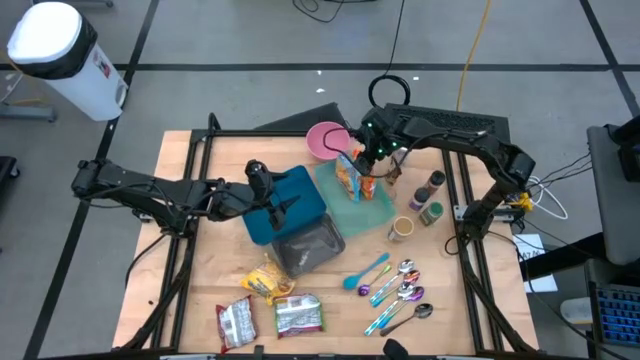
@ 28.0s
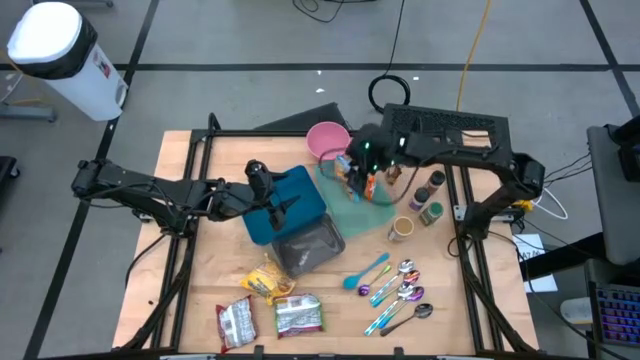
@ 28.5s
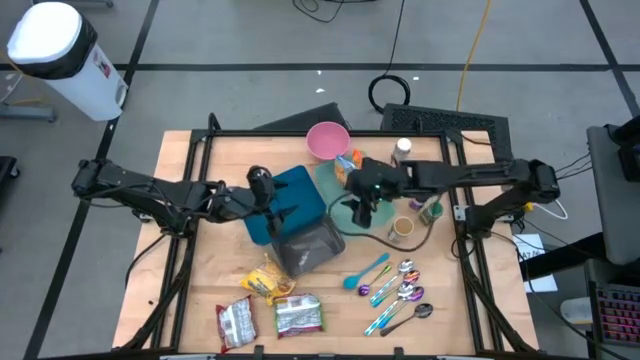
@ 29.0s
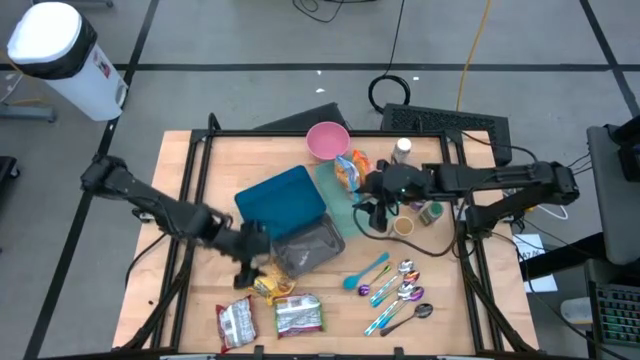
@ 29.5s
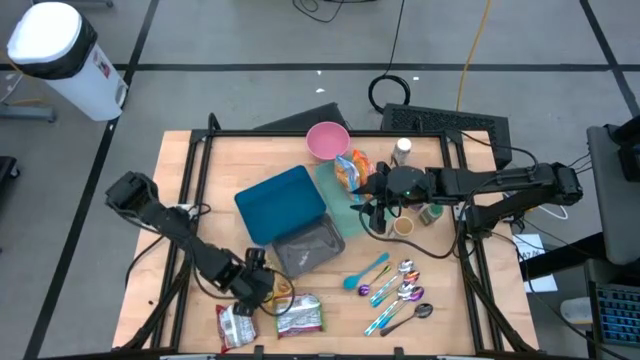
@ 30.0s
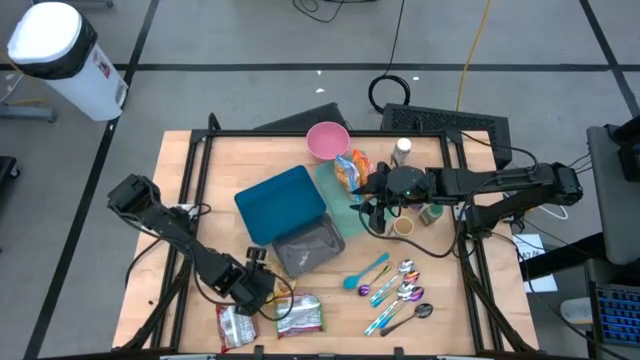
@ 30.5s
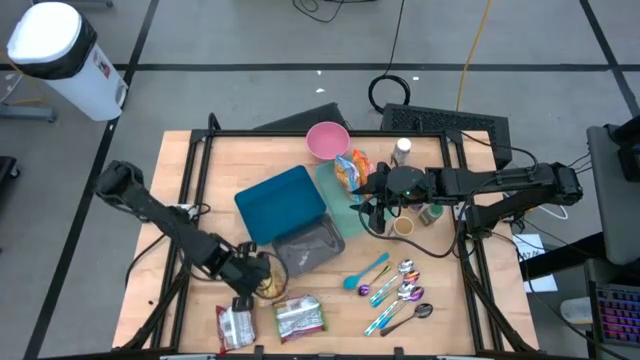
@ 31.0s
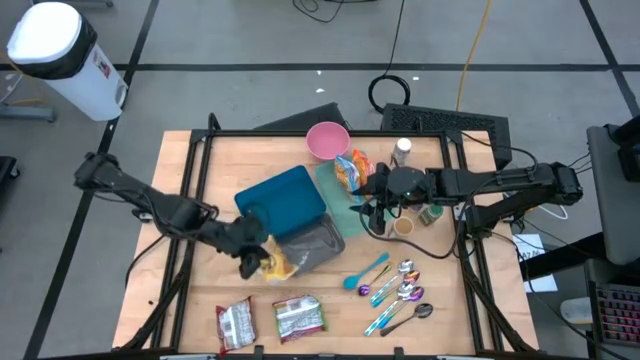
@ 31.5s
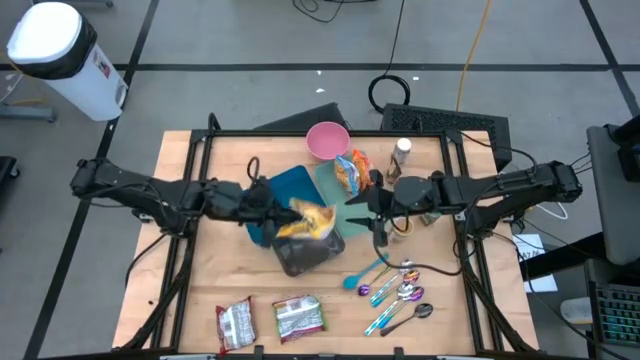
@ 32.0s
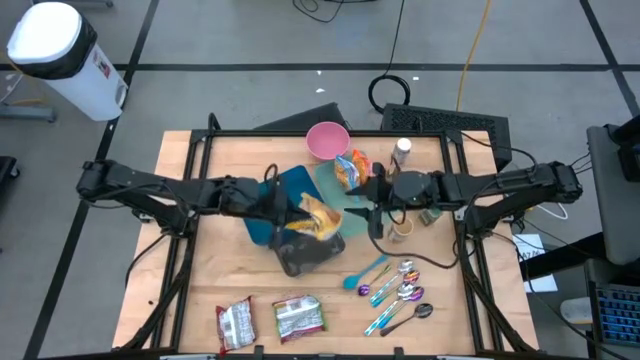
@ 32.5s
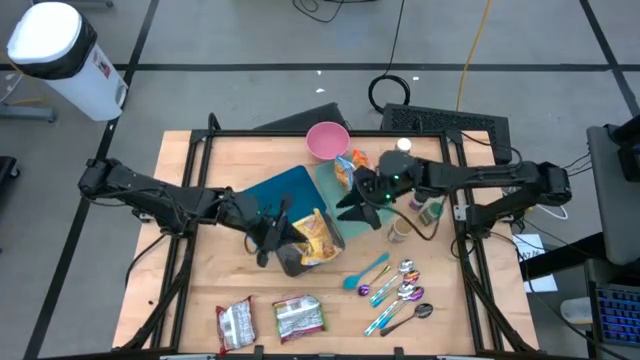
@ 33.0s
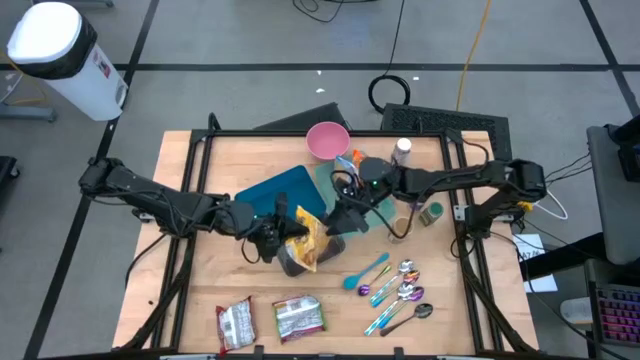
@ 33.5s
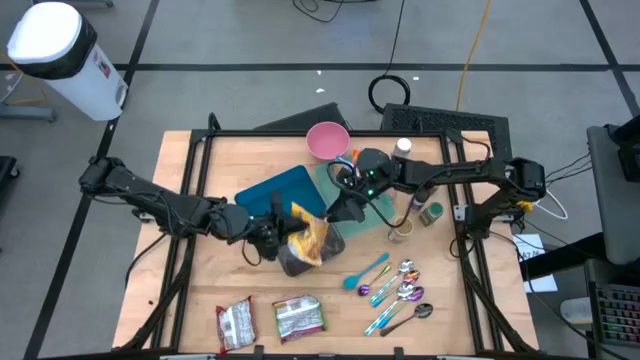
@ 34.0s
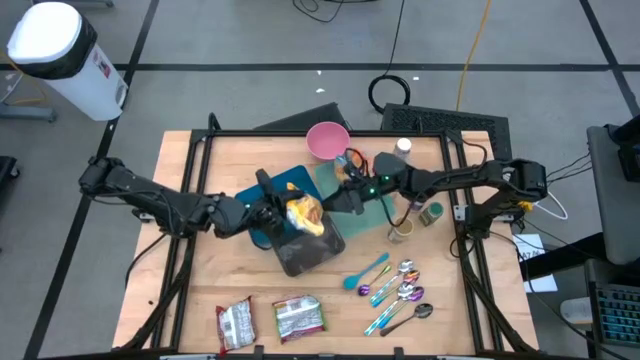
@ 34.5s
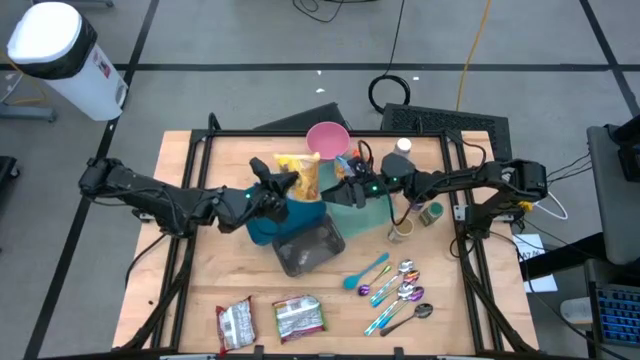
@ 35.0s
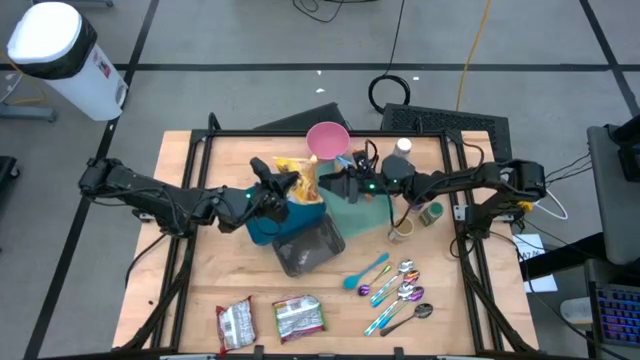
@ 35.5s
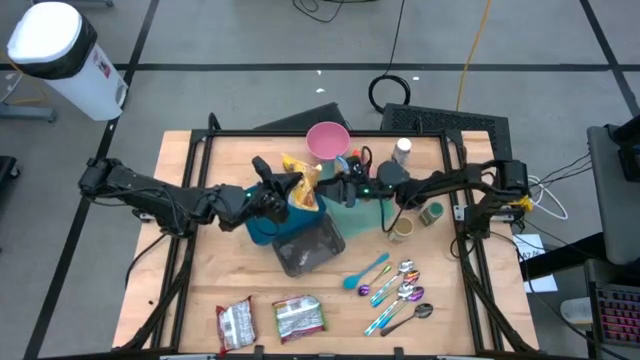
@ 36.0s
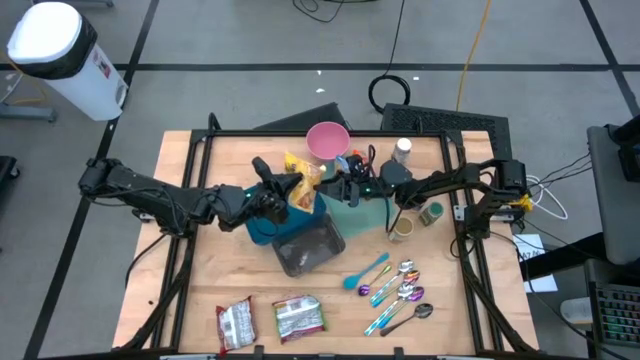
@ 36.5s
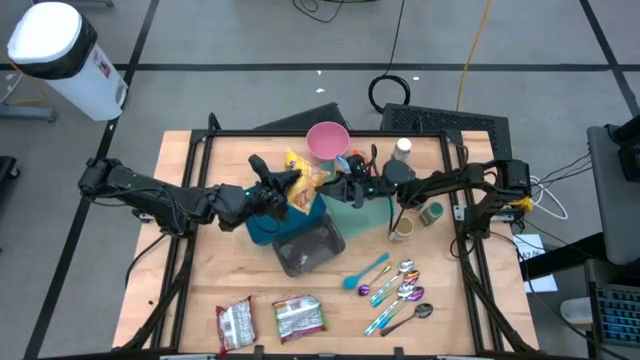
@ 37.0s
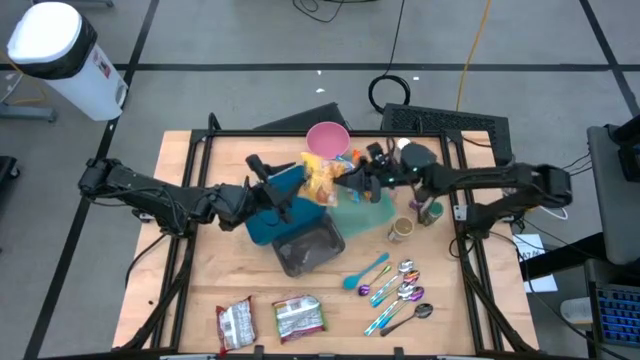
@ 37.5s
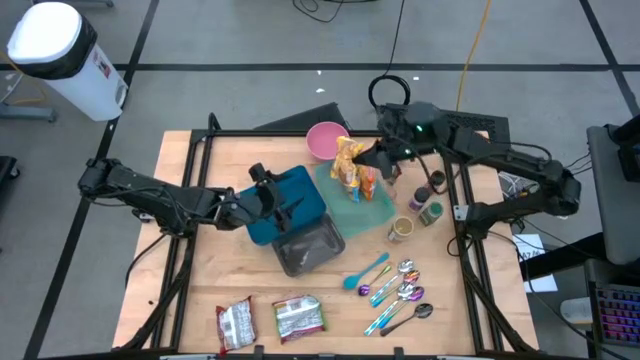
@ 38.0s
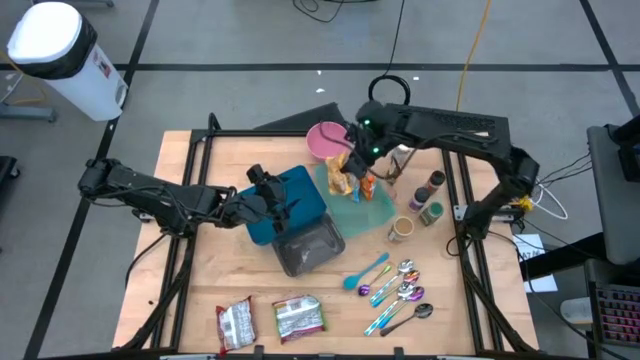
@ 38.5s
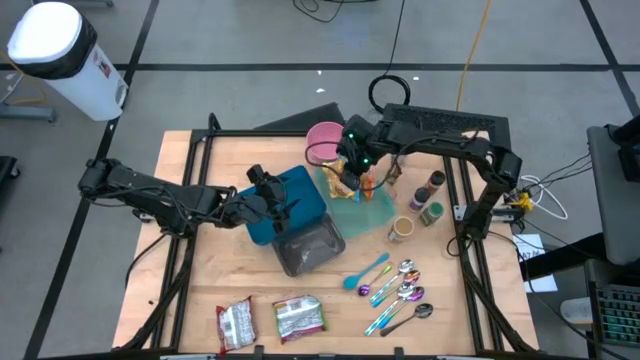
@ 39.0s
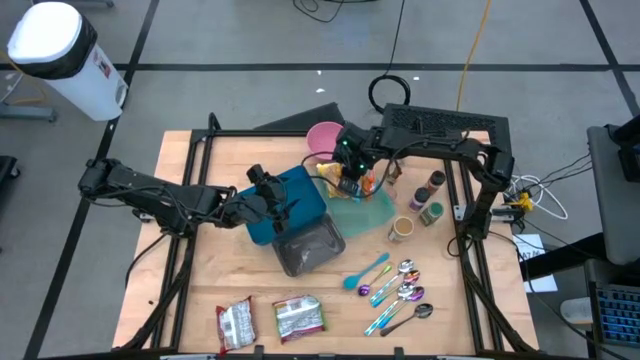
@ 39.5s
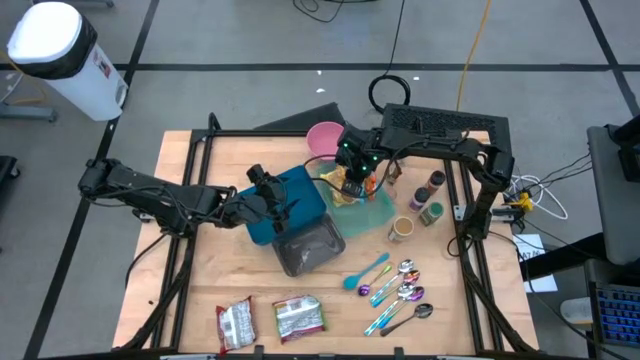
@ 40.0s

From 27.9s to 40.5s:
Task: Pick & Place Food Item
Put the yellow noodle pack into the green bin

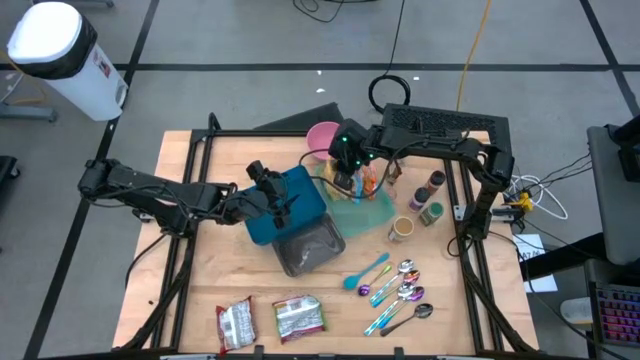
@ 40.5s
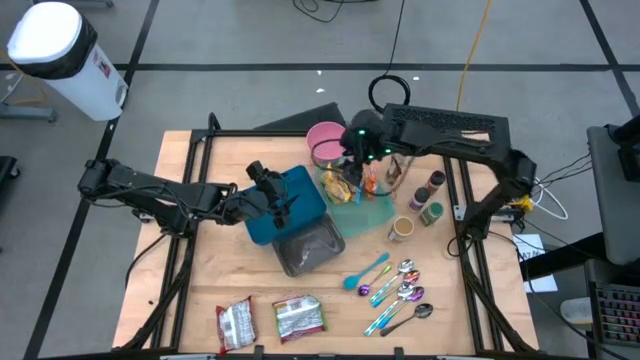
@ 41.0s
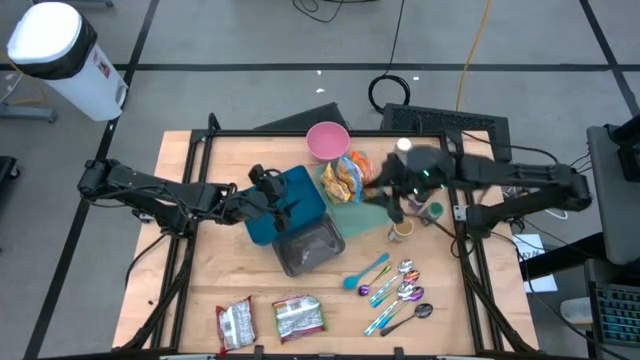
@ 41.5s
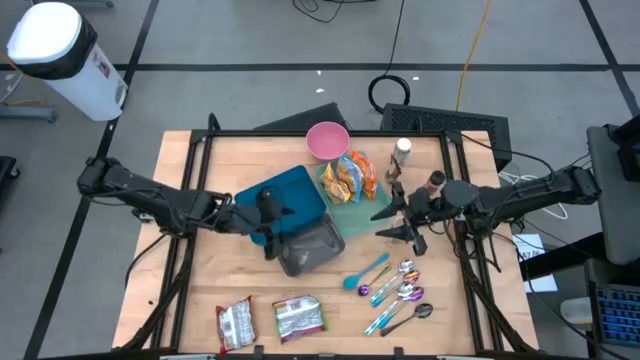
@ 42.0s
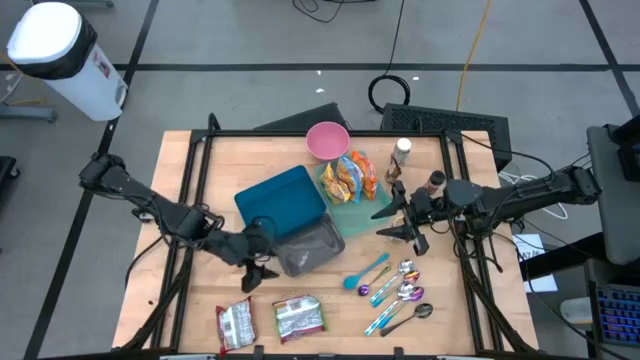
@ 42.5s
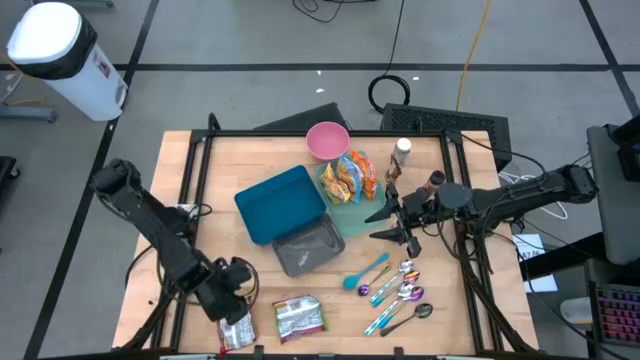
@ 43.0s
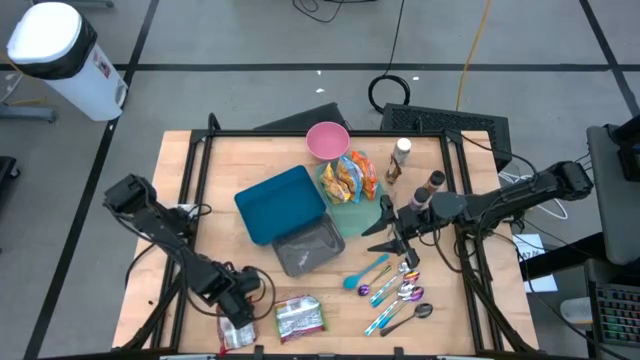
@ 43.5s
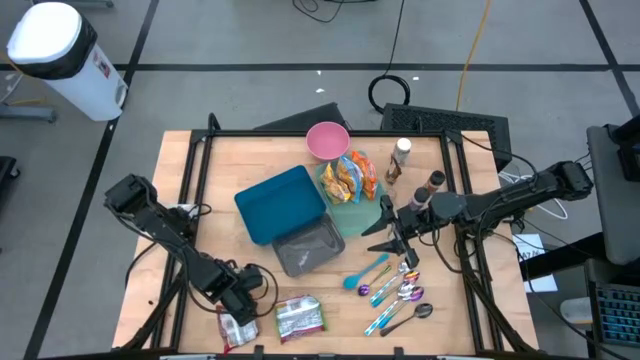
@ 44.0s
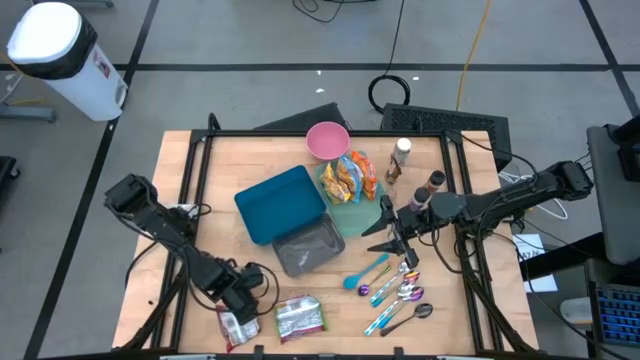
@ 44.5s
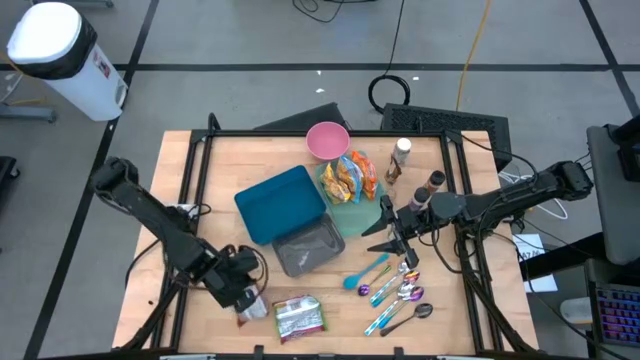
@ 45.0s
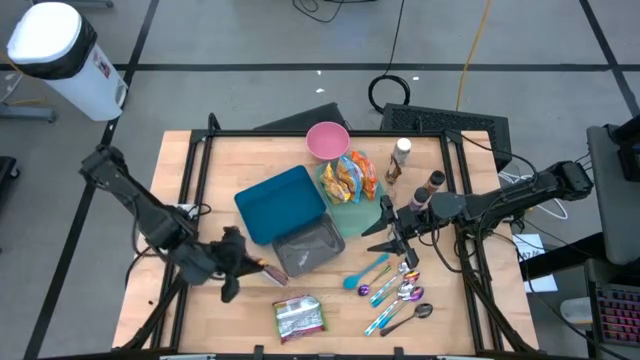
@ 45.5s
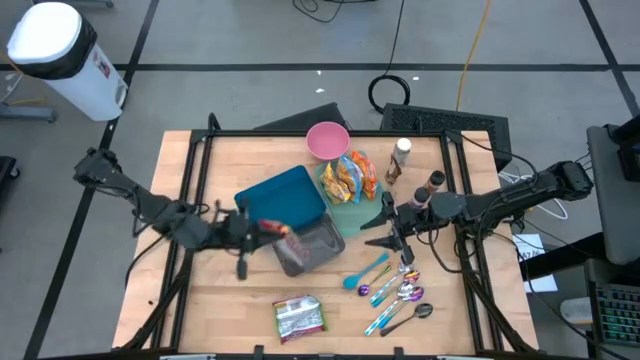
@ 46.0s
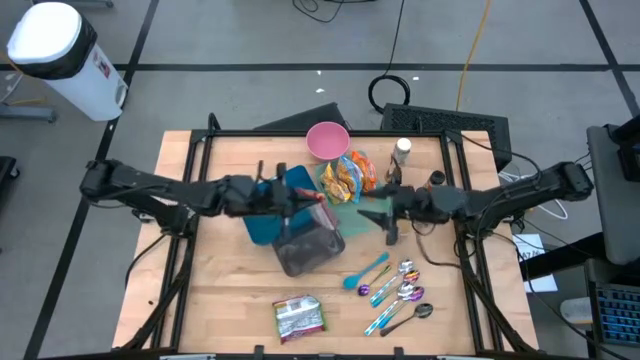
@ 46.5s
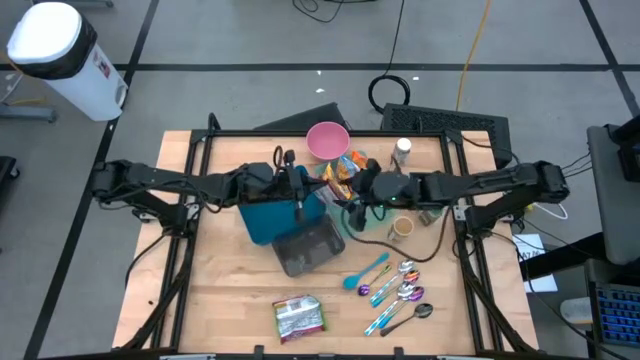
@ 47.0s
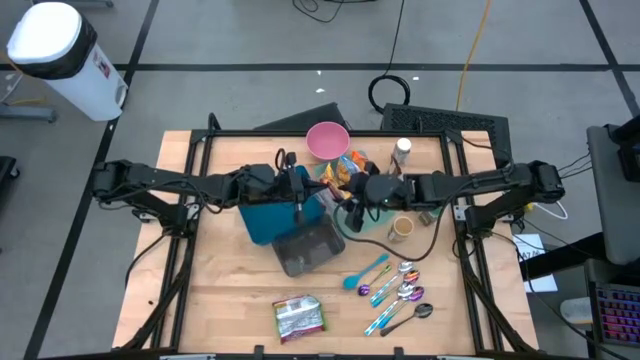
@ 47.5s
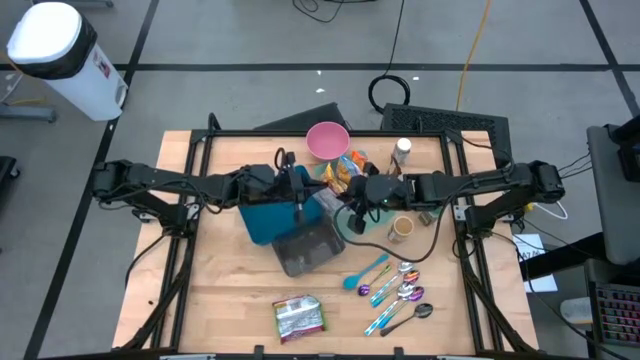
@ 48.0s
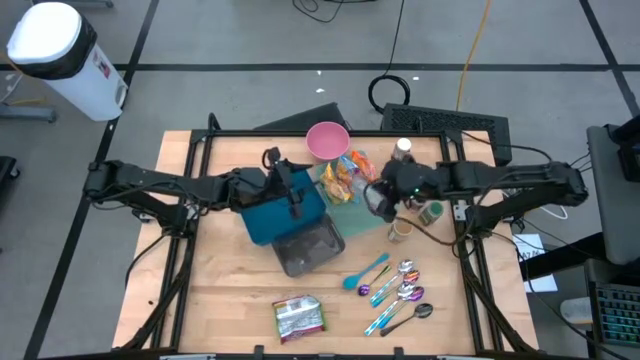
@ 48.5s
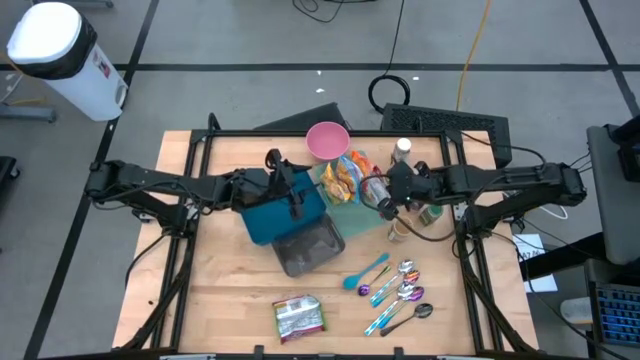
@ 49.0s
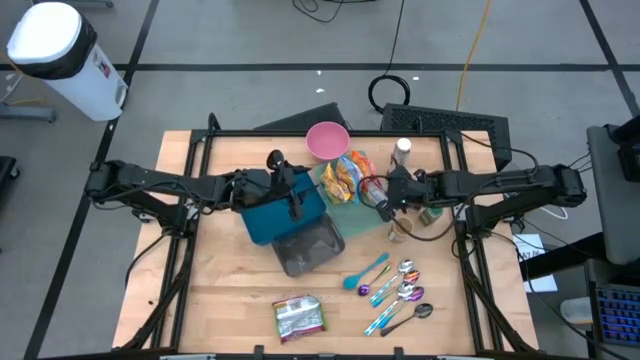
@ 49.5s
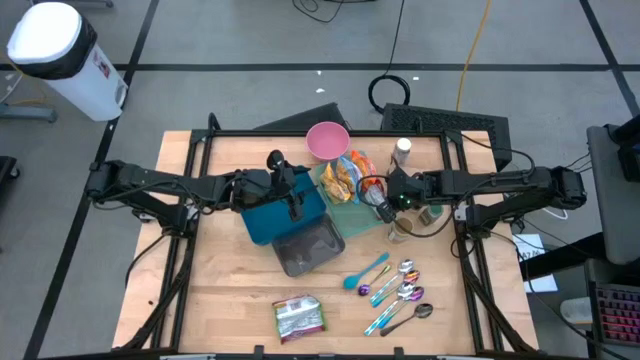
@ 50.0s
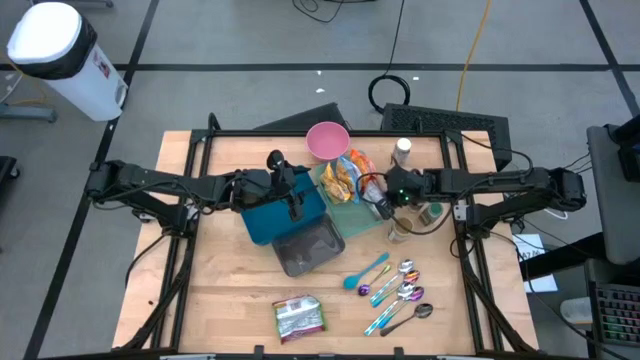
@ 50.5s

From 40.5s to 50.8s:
Put the red noodle pack into the green bin
